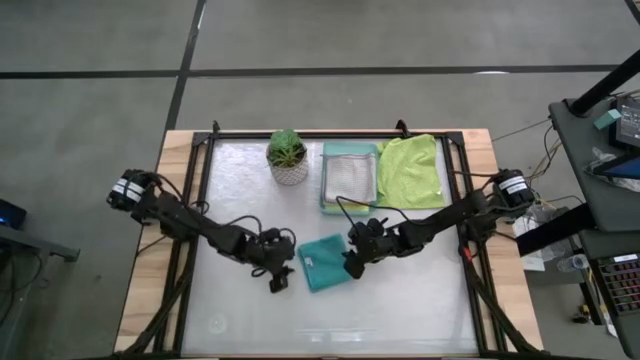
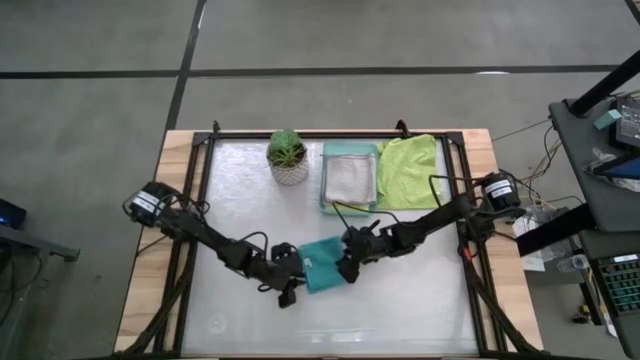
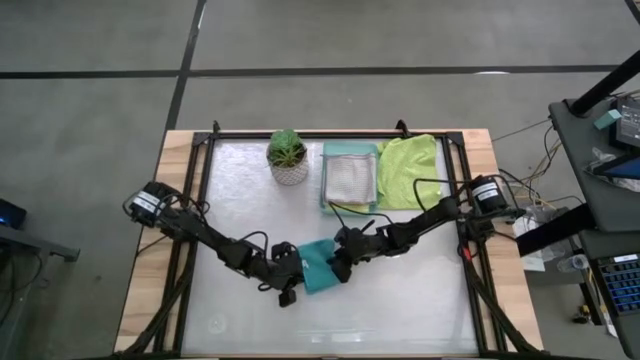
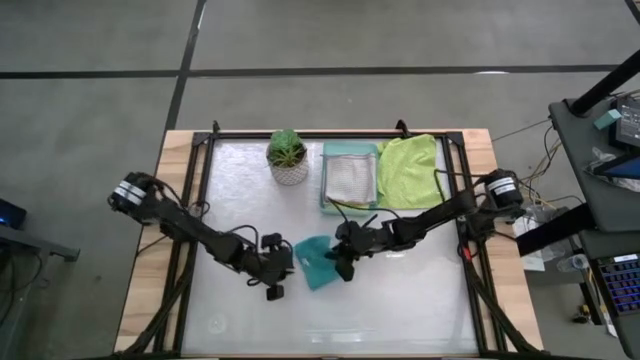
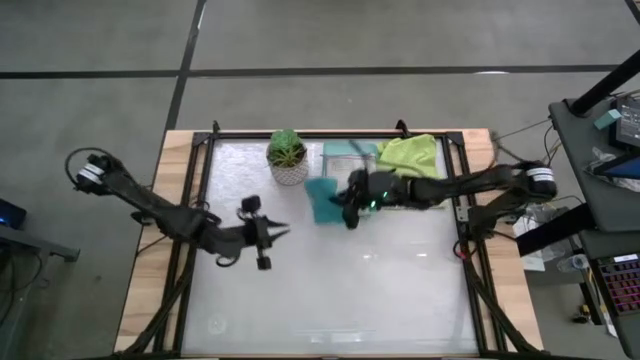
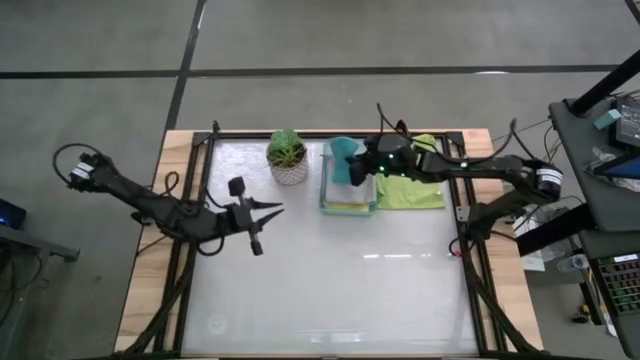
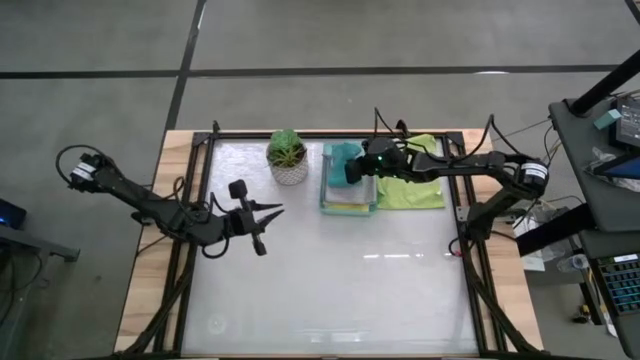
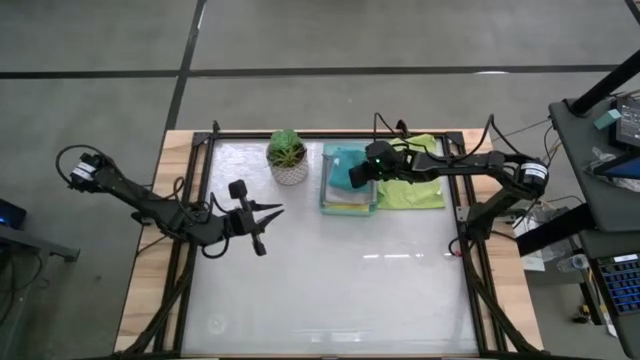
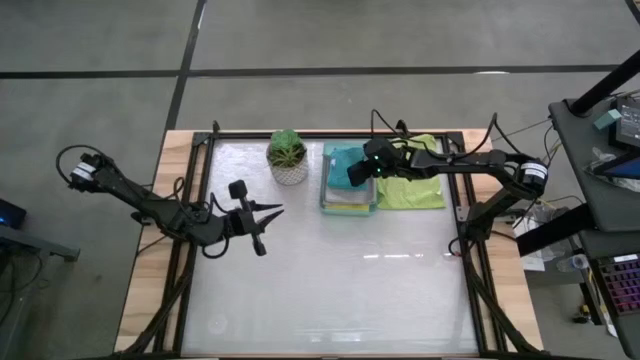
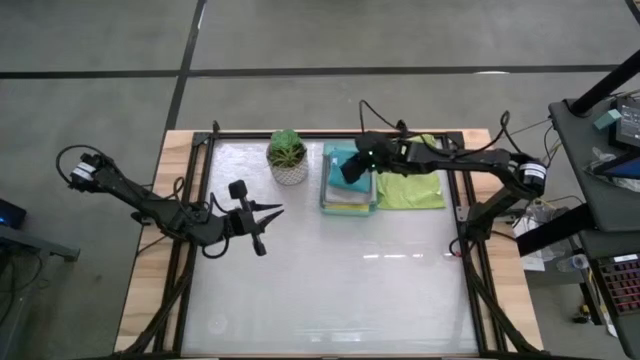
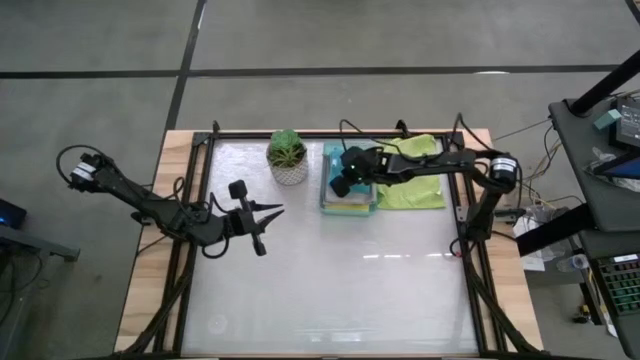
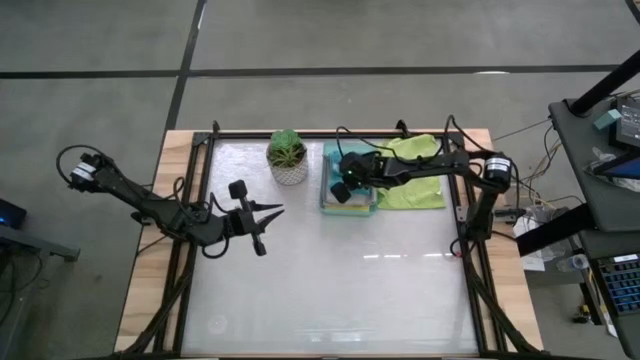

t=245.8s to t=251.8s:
Task: Fold microfiber towels
Put the folded blue microfiber cloth into the blue bin

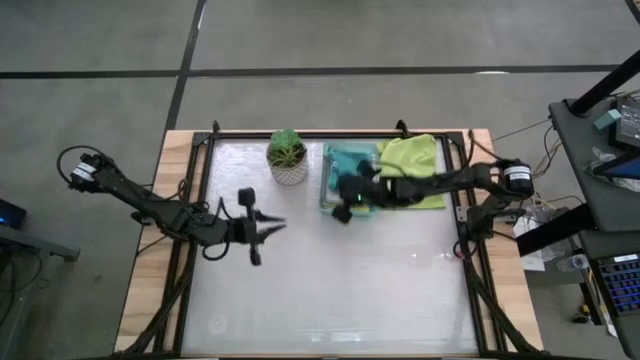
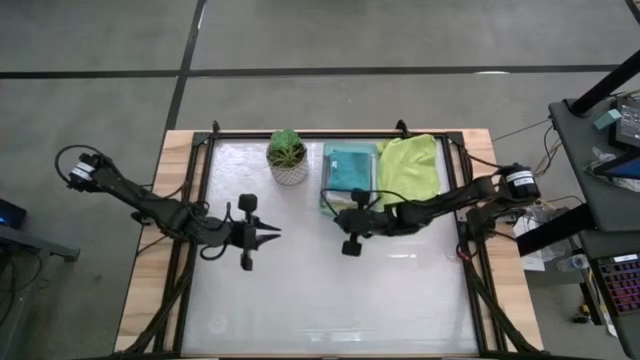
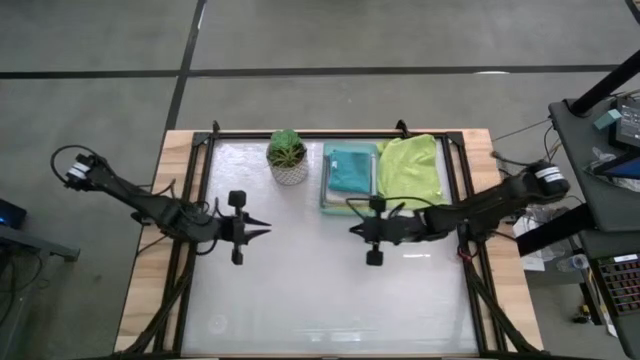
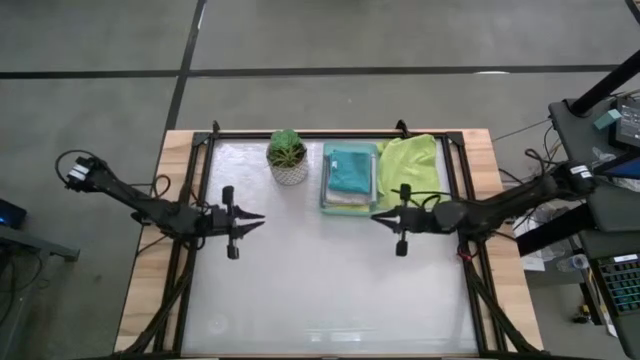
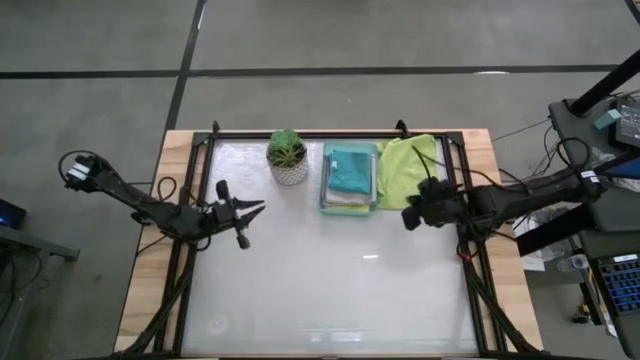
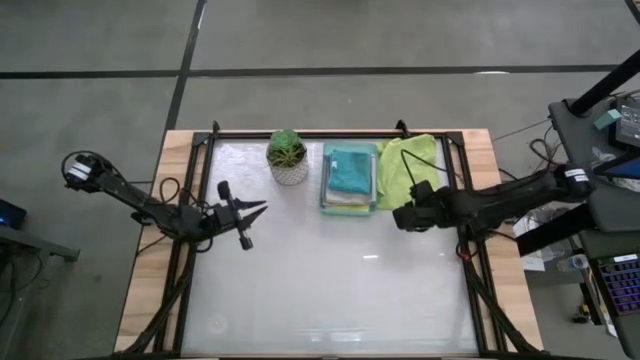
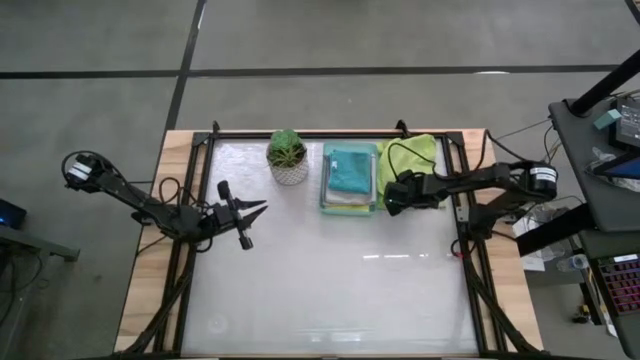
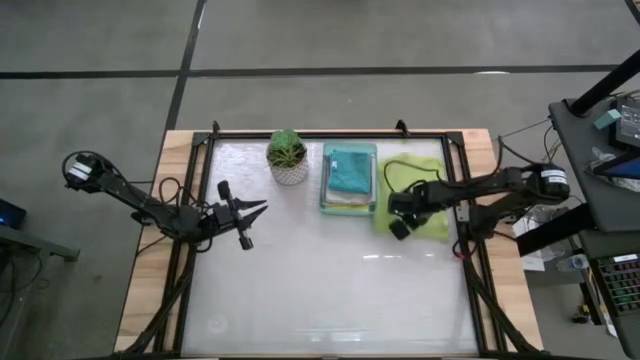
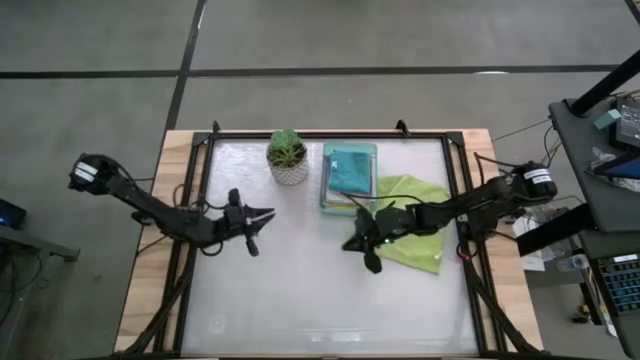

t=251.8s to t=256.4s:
Fold the green microfiber cloth

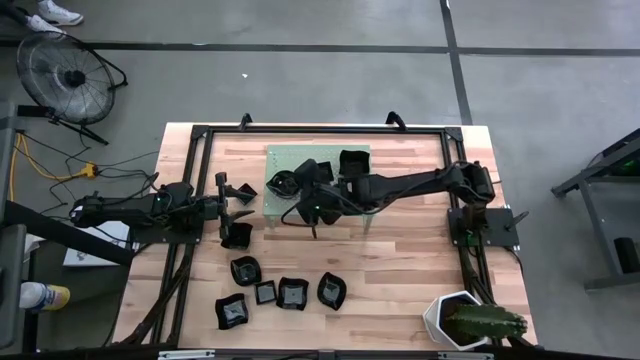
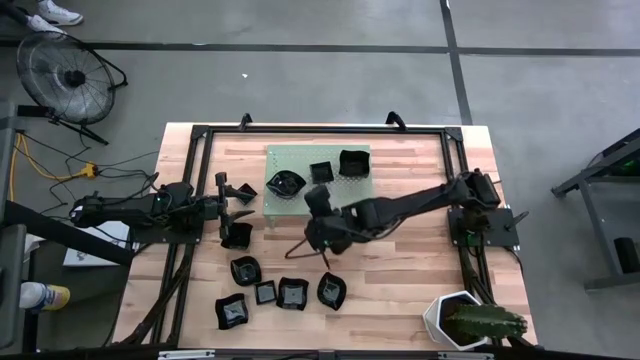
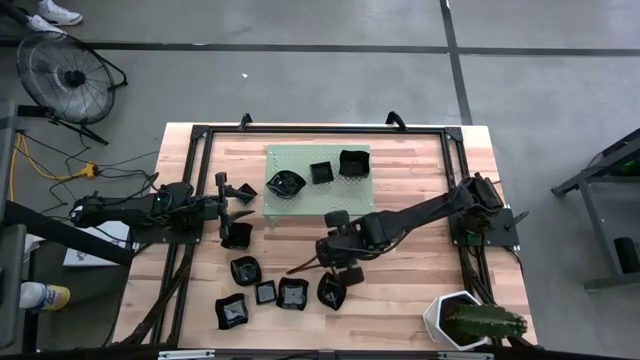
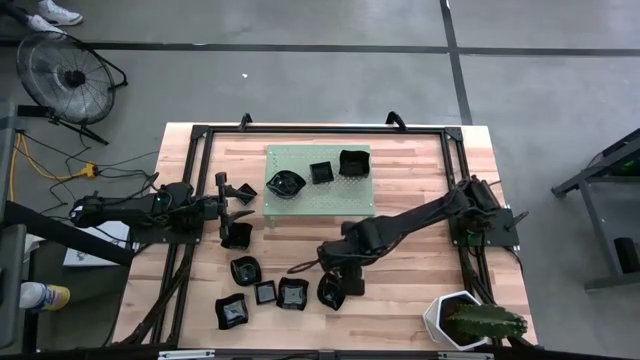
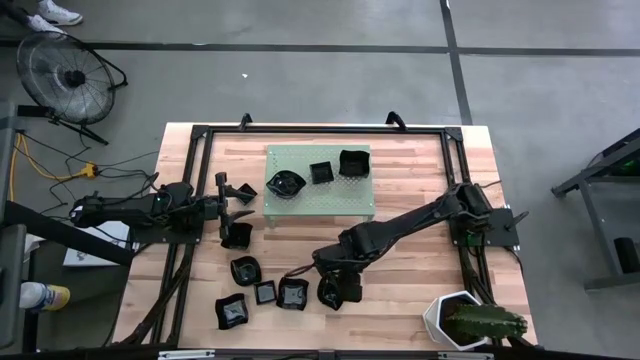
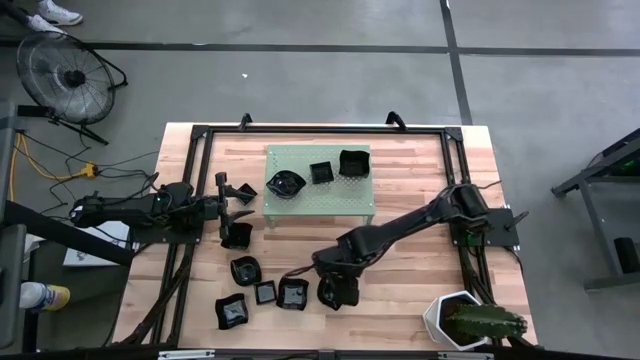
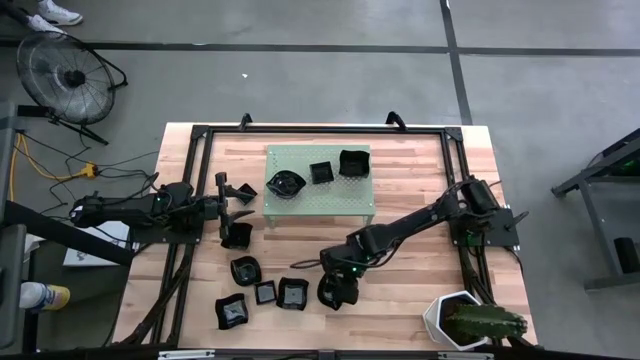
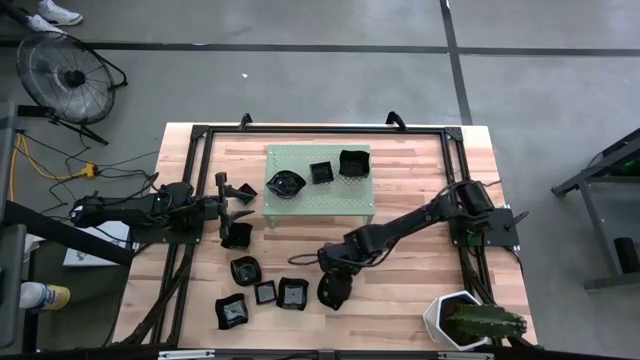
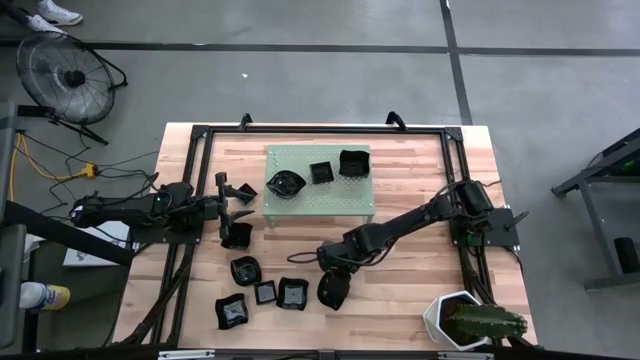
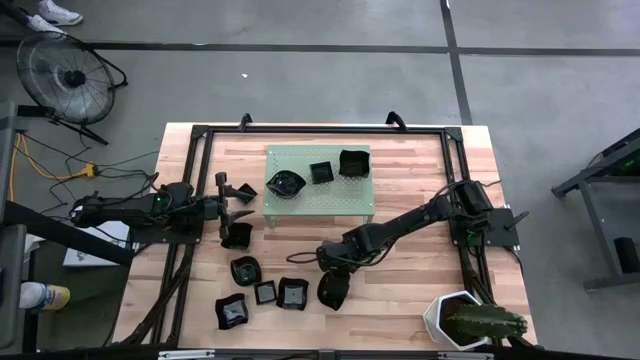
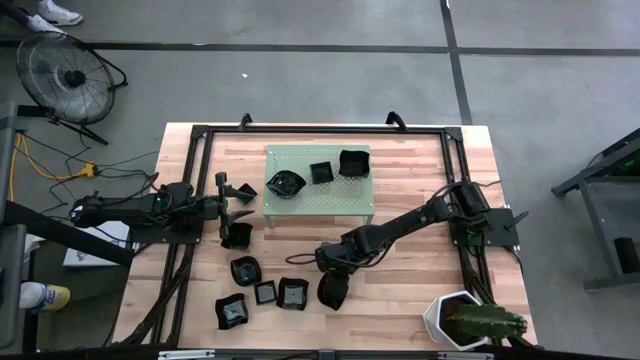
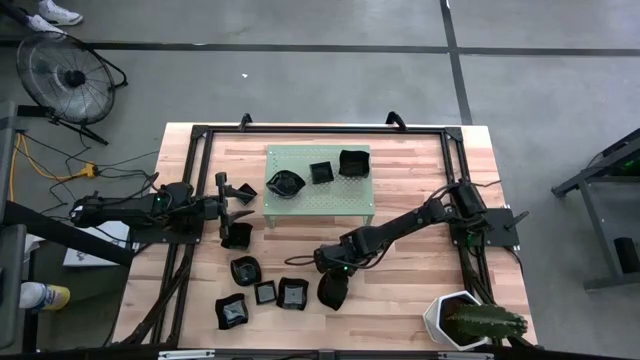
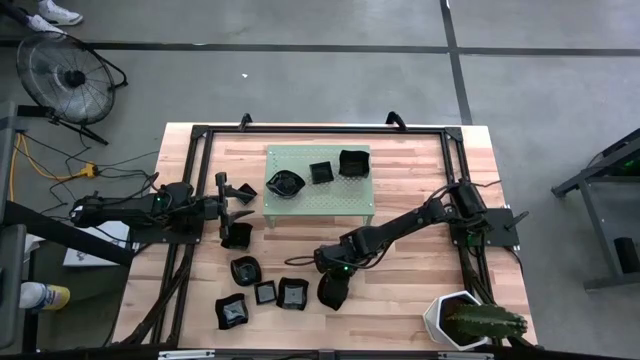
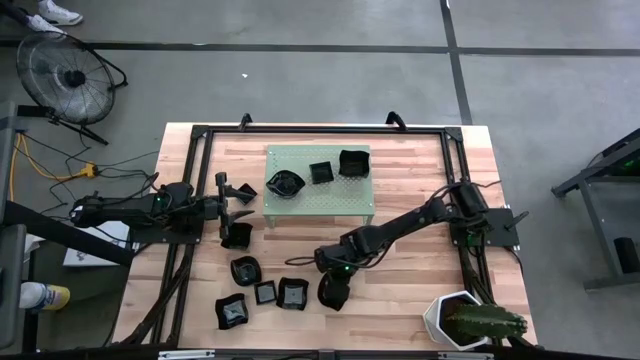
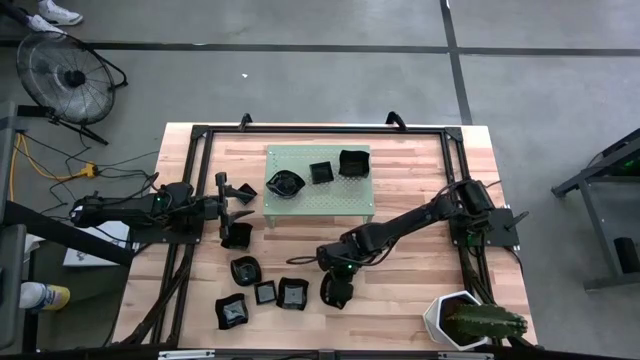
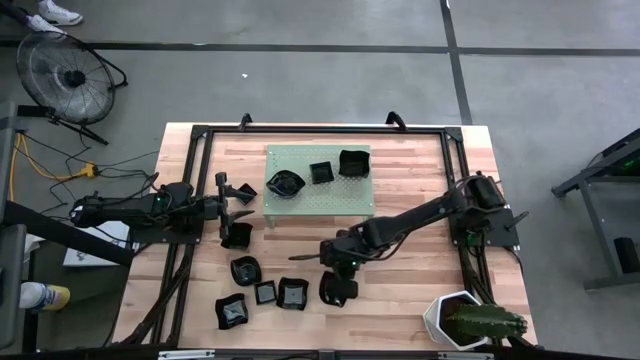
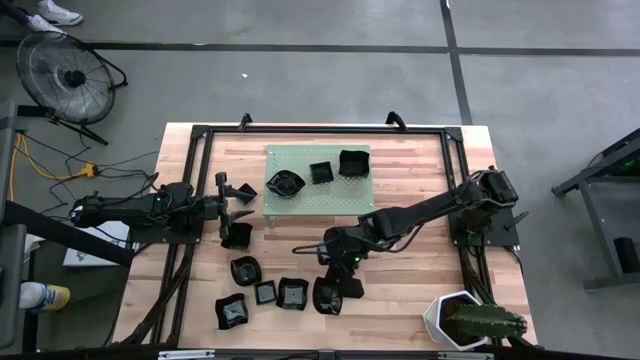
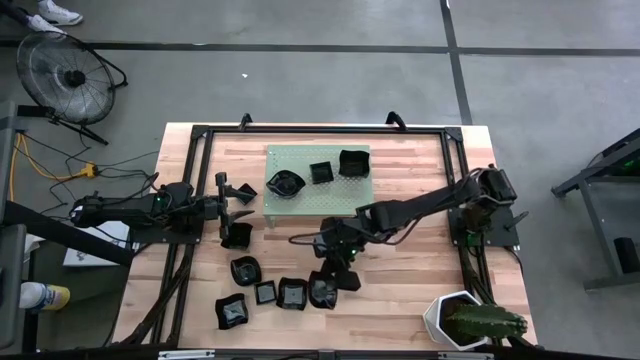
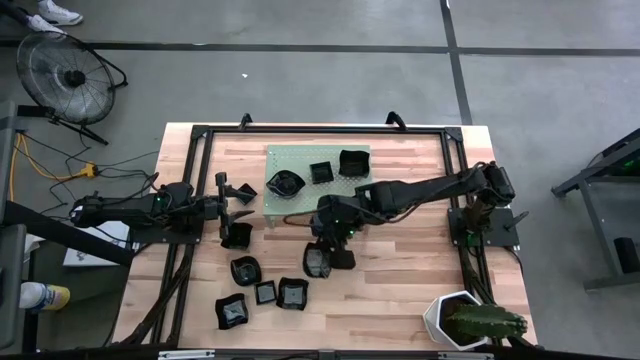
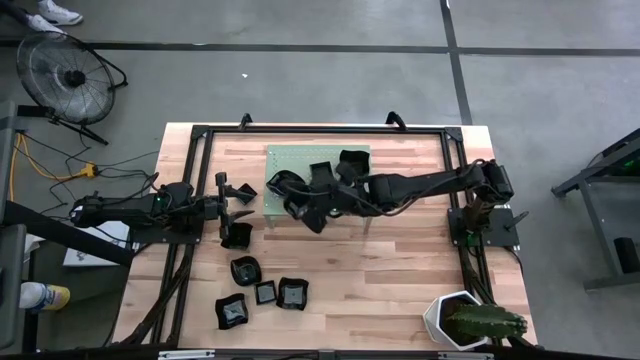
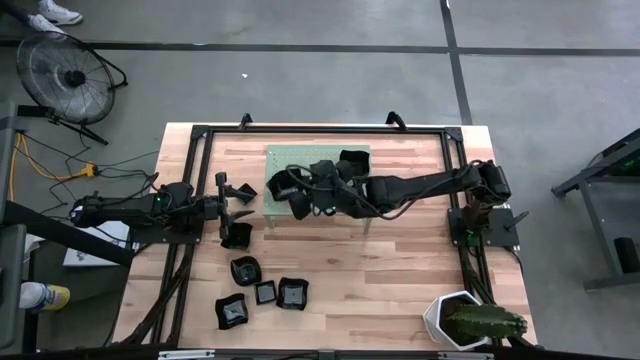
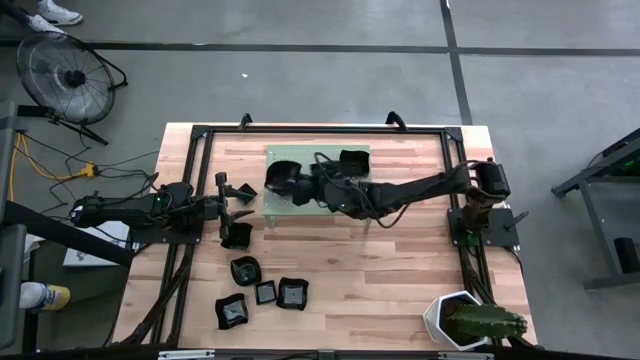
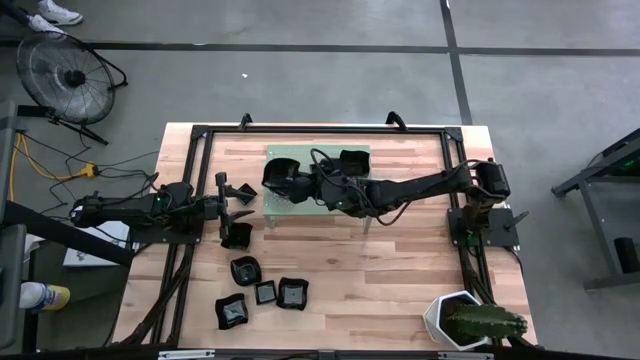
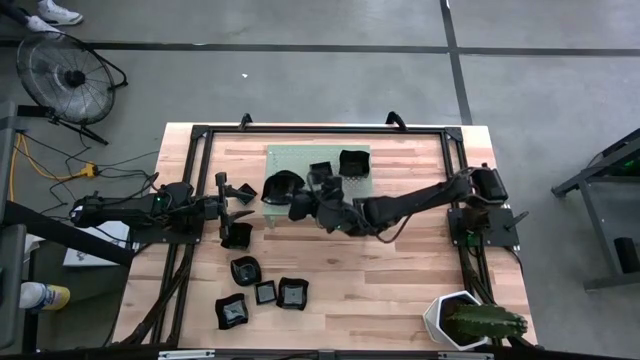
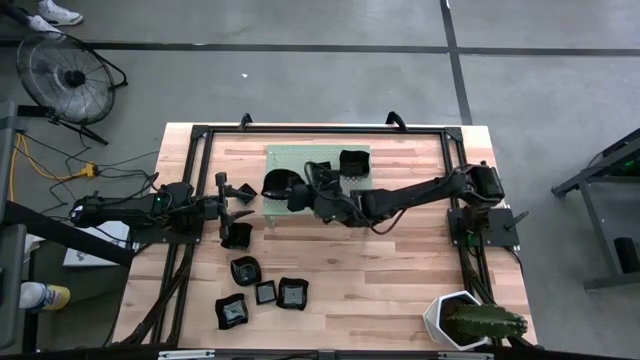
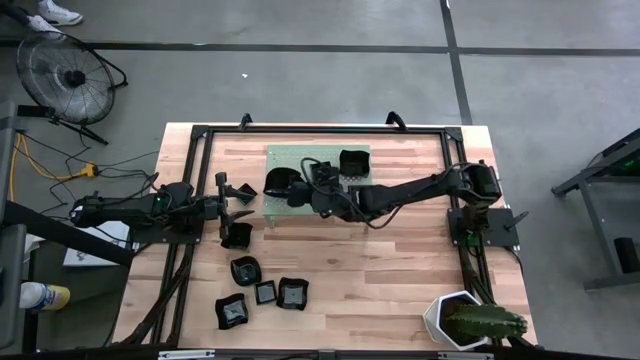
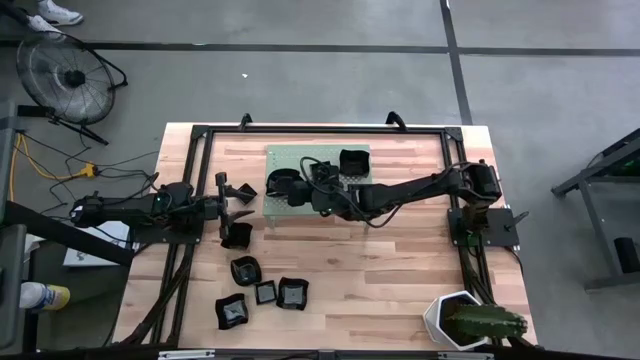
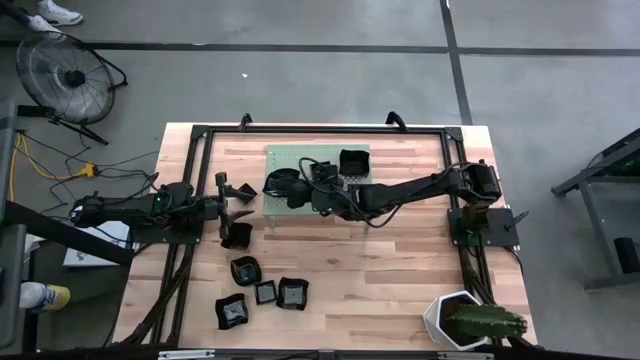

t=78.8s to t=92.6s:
Task: Pick & Place Mini shaped plates
Stack the leaf-shaped plate on top of the other leaf-shaped plates on the shelf
